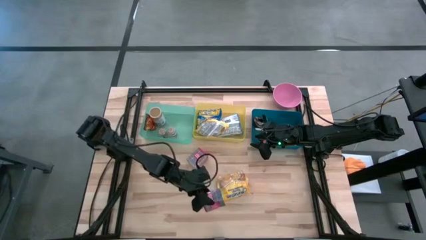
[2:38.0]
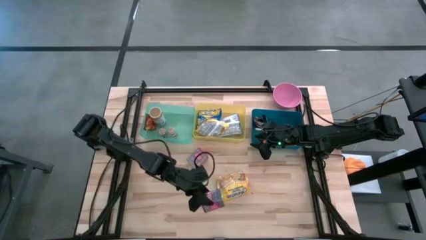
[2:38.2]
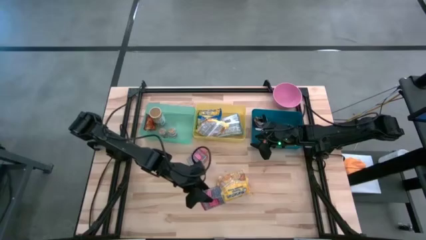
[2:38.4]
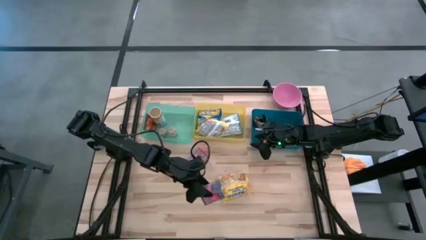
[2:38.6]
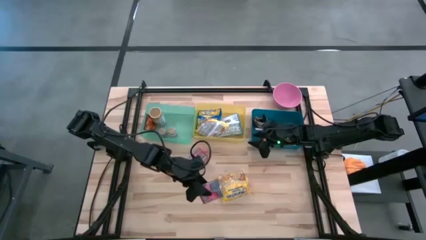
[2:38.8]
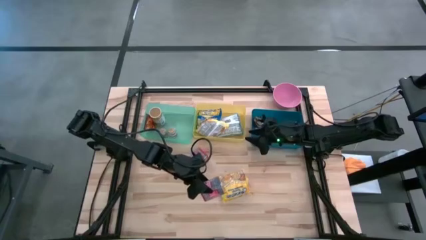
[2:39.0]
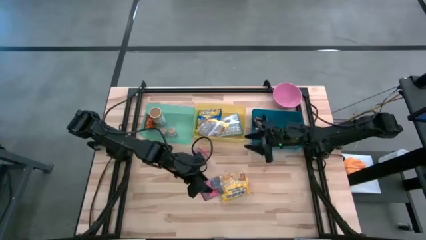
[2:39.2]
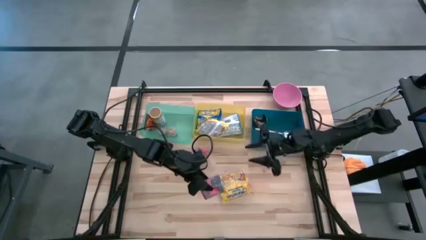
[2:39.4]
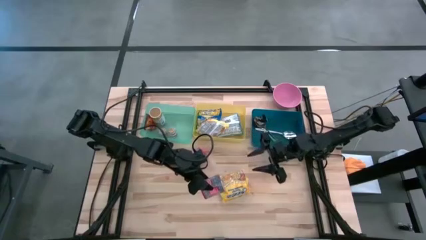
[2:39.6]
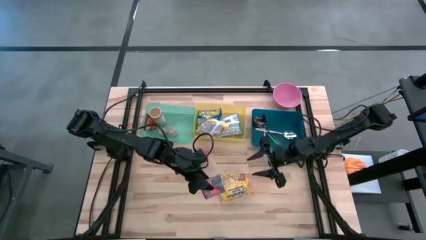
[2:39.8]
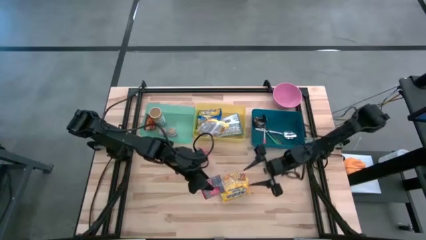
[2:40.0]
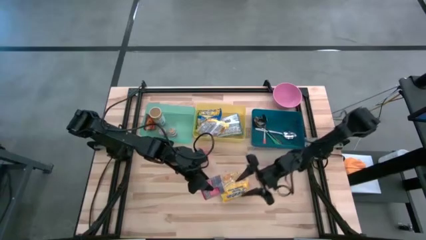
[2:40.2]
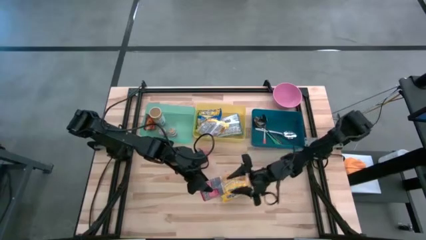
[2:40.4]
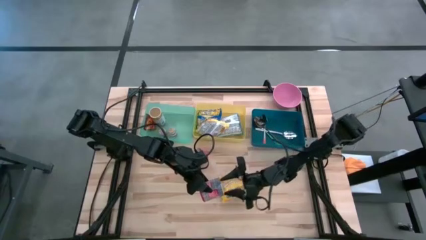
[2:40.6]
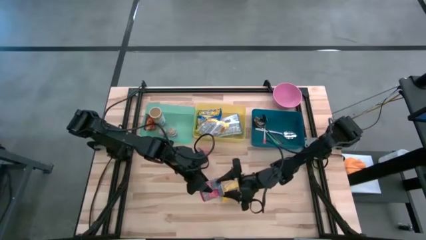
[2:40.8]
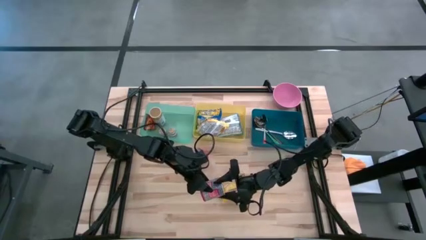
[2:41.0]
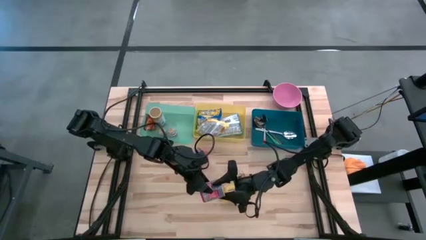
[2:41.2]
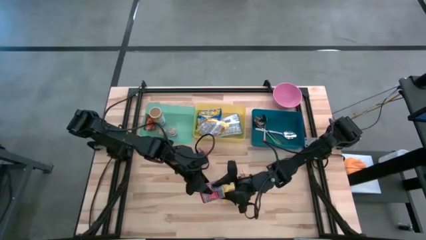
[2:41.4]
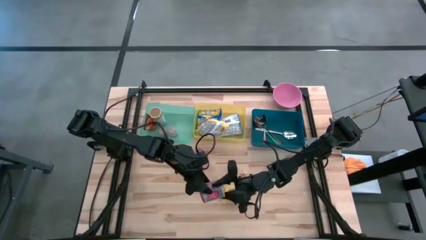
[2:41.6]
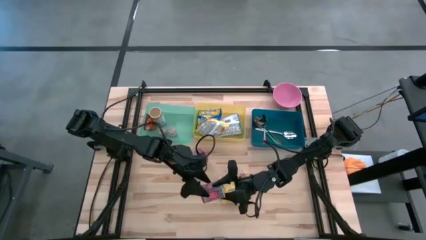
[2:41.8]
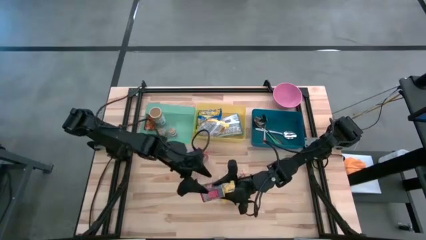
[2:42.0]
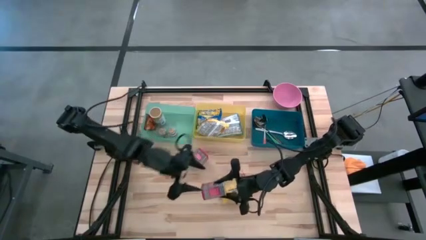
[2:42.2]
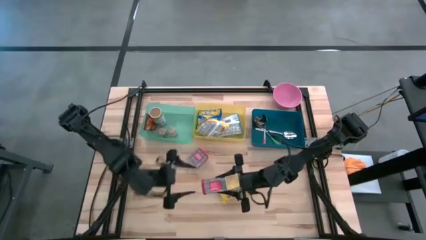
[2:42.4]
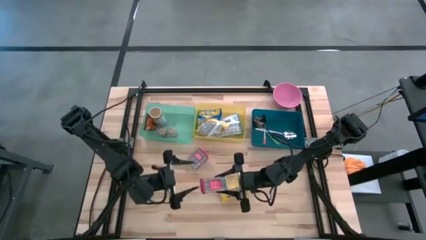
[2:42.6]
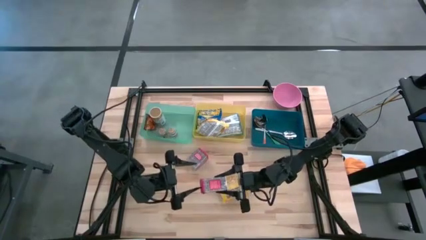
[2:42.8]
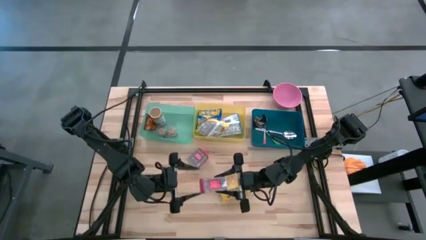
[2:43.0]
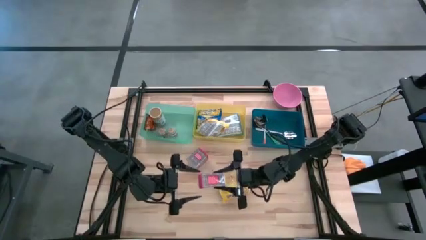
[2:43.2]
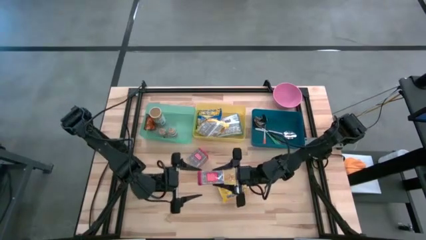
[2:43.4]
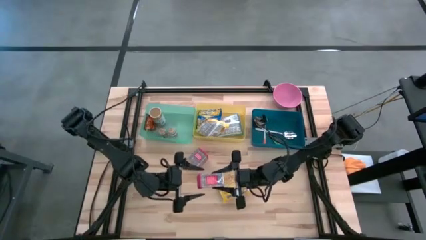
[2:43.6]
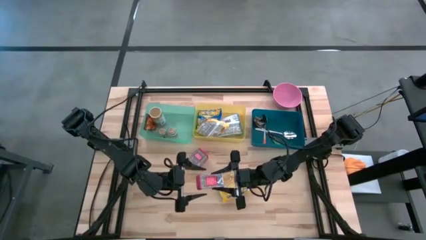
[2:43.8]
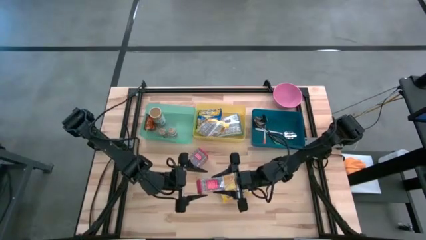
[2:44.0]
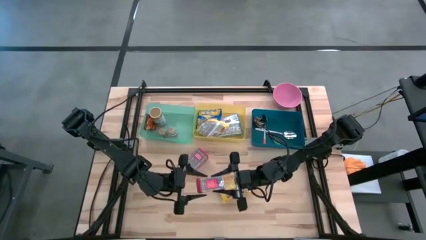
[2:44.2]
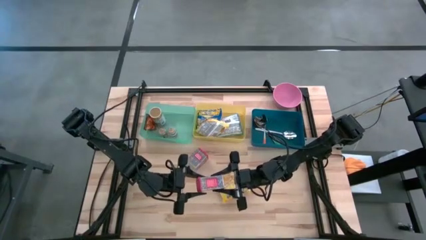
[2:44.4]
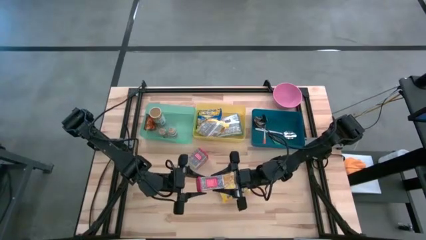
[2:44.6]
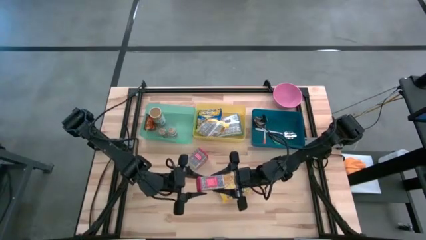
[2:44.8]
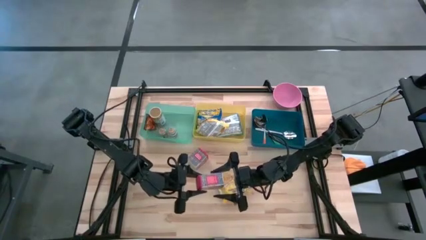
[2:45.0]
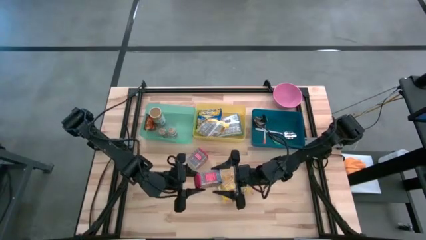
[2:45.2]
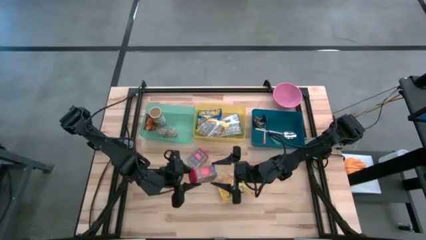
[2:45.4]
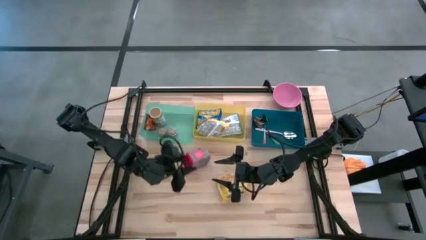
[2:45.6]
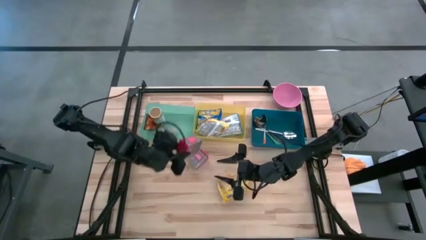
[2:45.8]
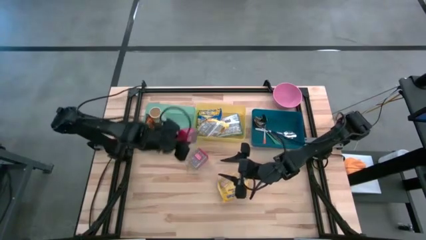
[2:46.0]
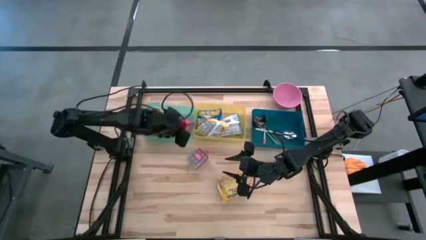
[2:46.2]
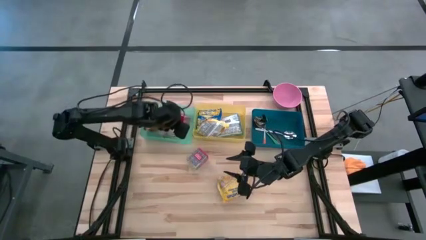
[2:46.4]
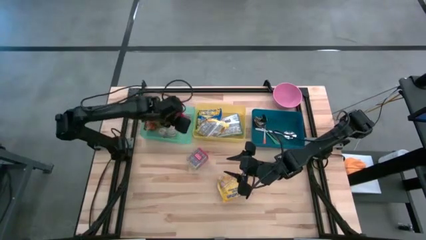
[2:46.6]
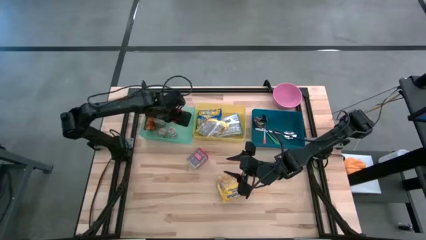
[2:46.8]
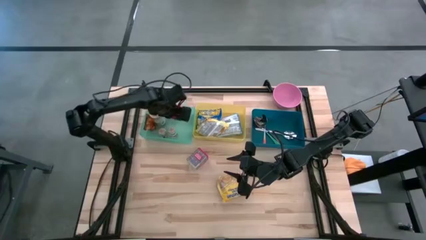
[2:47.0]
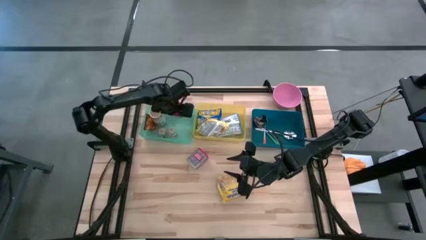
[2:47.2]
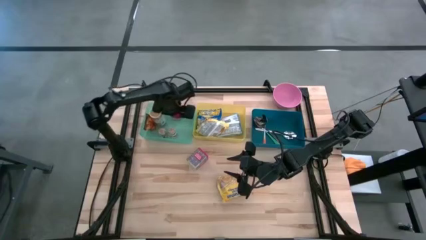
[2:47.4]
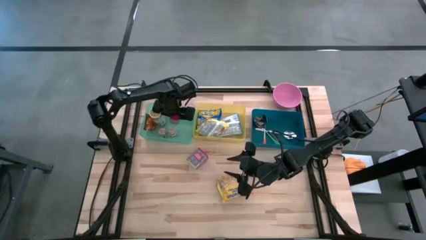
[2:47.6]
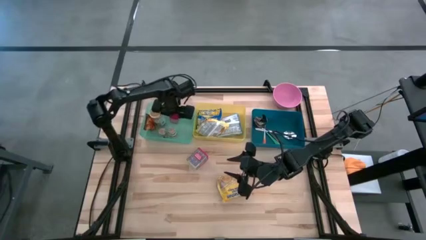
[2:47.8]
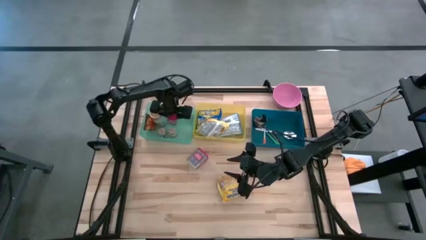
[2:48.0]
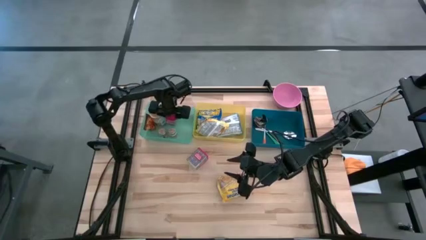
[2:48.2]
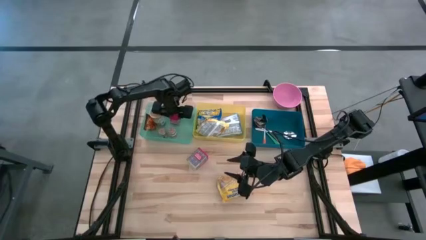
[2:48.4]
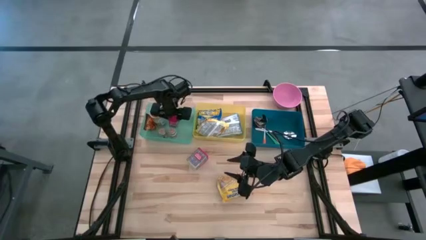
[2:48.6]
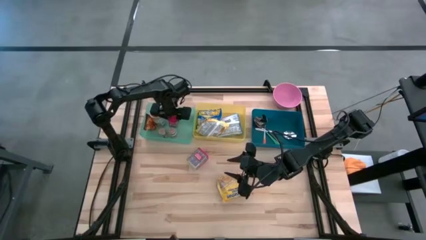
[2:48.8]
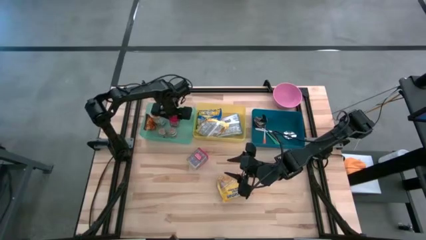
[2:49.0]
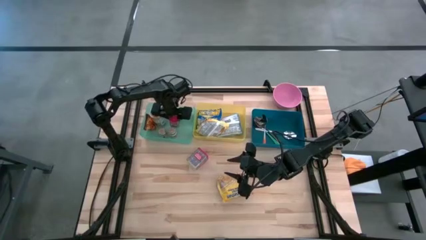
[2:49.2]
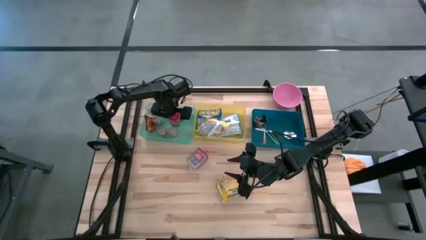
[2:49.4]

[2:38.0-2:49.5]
Put the red seasoning can into the green bin
